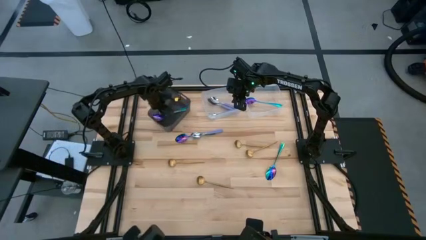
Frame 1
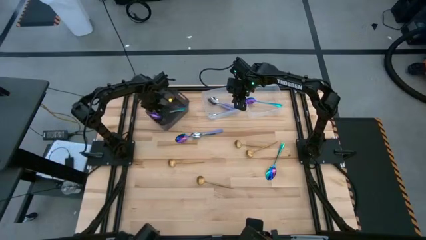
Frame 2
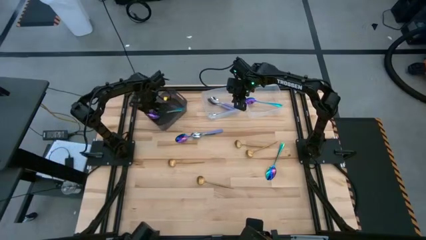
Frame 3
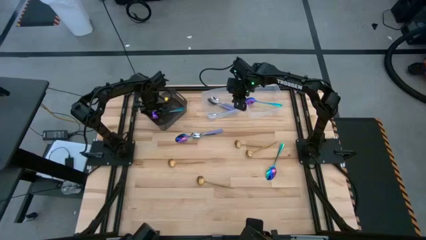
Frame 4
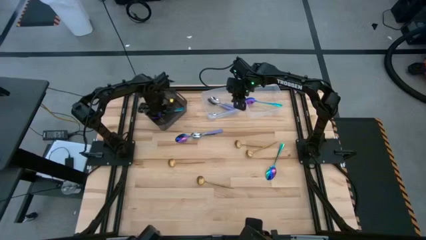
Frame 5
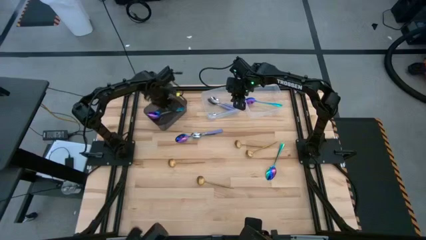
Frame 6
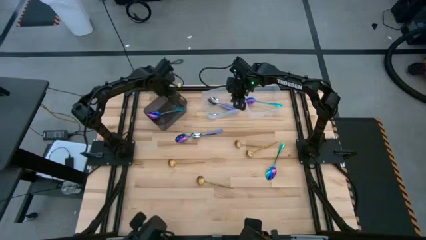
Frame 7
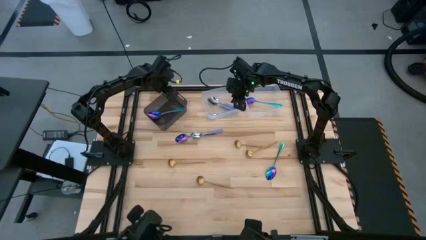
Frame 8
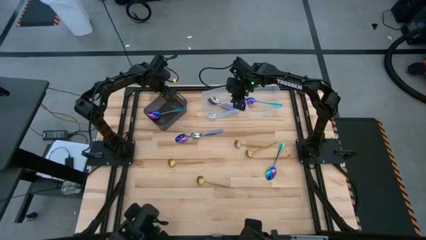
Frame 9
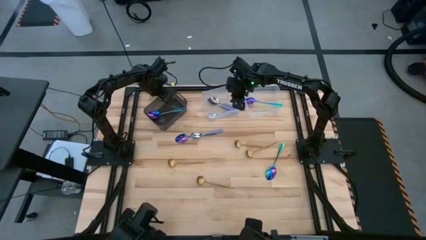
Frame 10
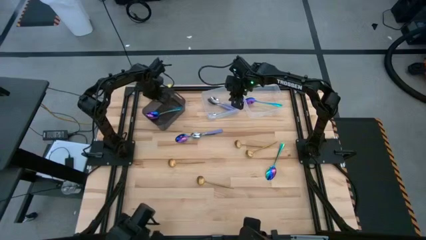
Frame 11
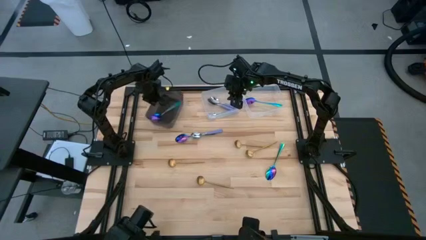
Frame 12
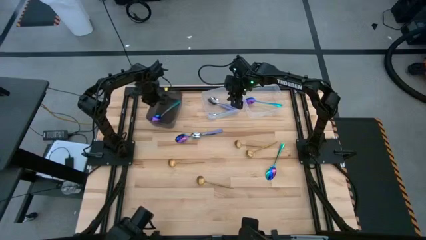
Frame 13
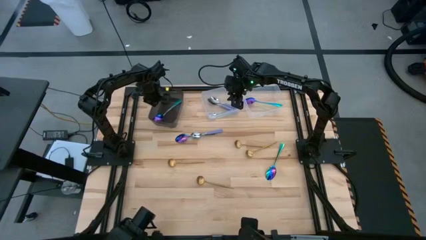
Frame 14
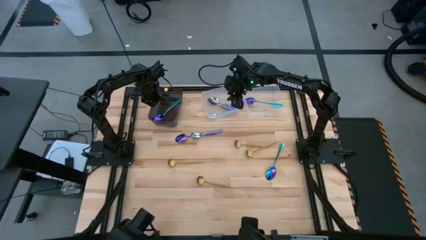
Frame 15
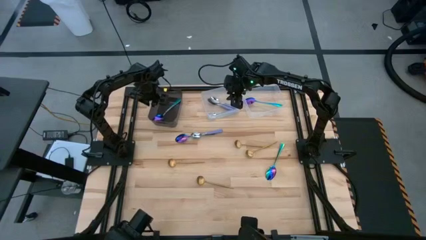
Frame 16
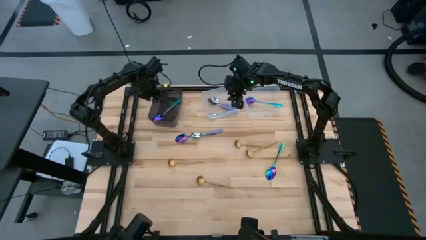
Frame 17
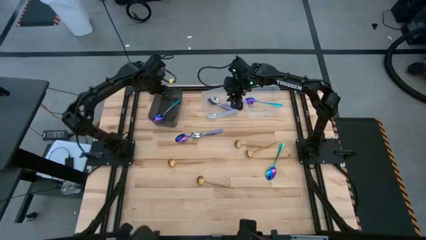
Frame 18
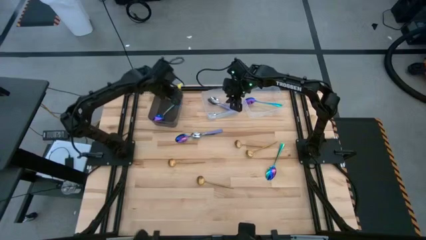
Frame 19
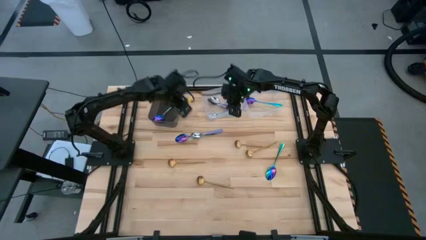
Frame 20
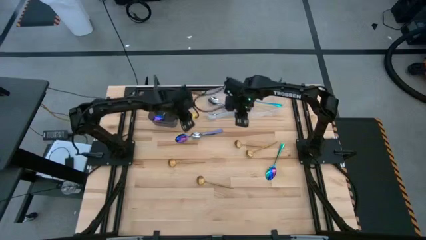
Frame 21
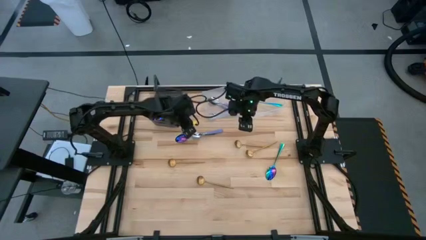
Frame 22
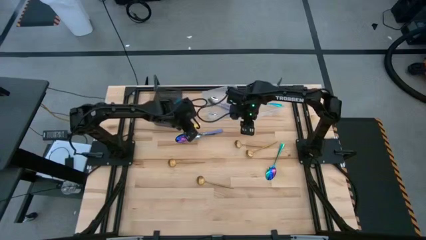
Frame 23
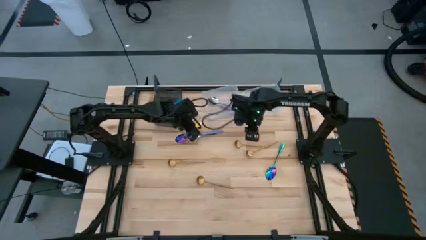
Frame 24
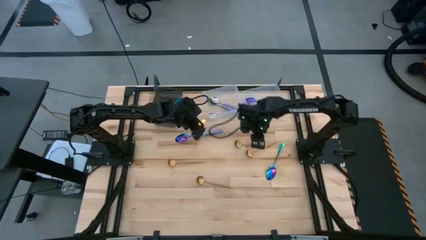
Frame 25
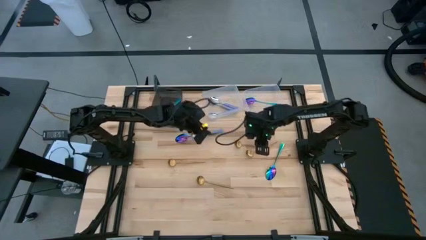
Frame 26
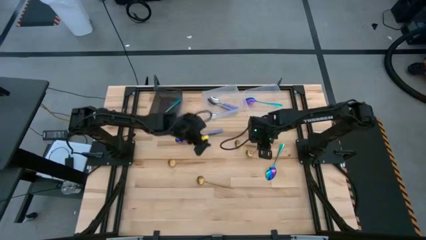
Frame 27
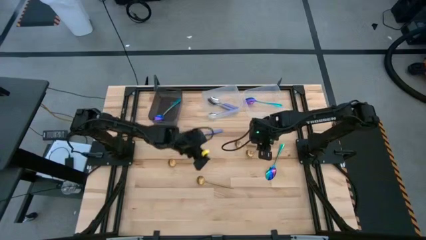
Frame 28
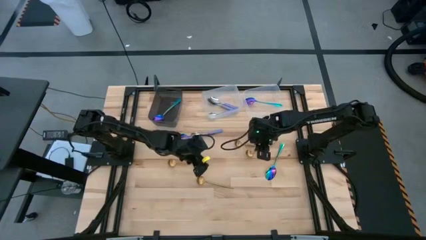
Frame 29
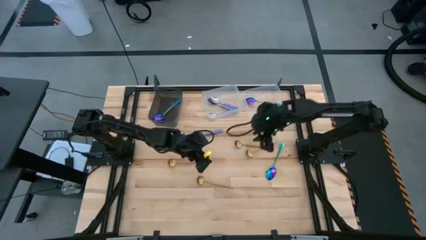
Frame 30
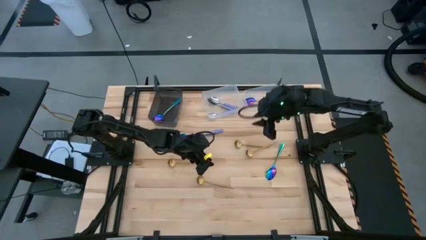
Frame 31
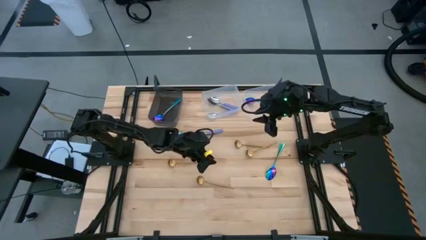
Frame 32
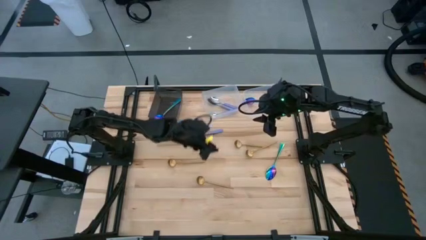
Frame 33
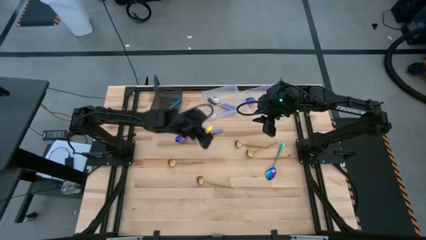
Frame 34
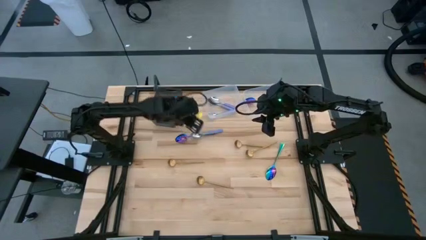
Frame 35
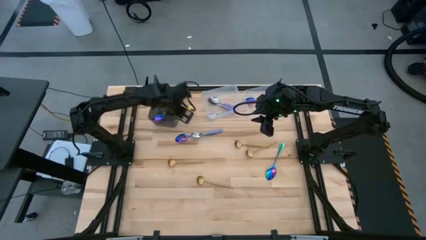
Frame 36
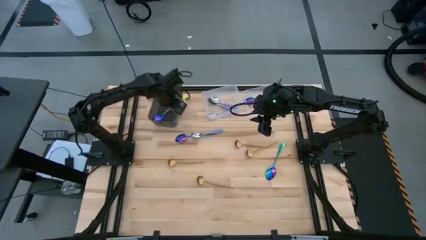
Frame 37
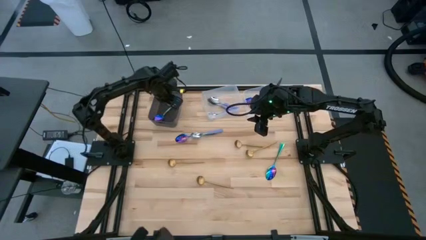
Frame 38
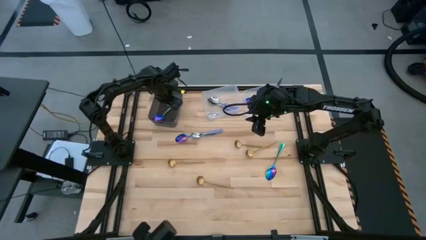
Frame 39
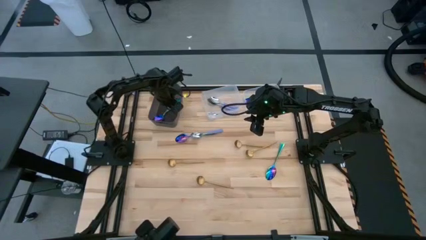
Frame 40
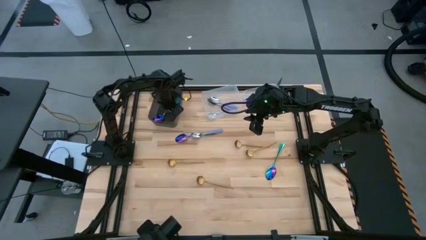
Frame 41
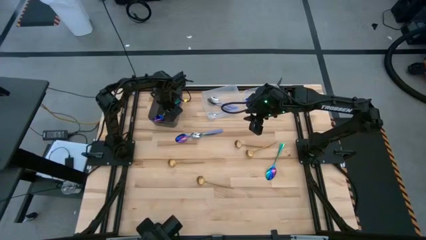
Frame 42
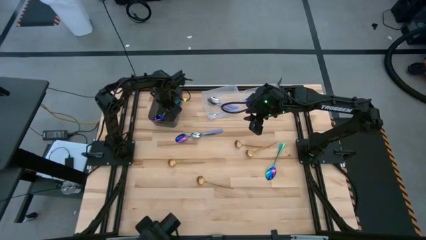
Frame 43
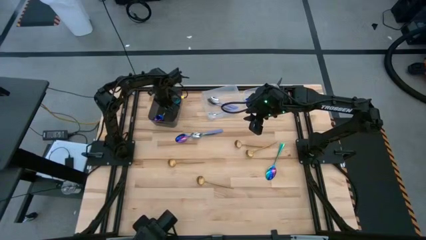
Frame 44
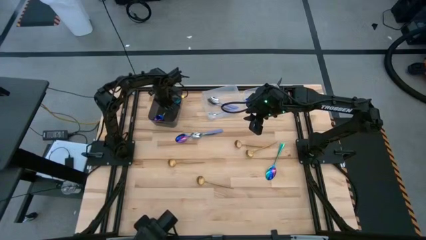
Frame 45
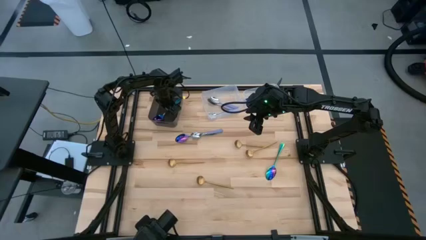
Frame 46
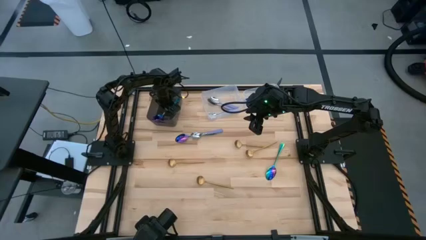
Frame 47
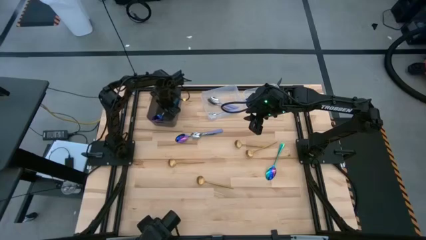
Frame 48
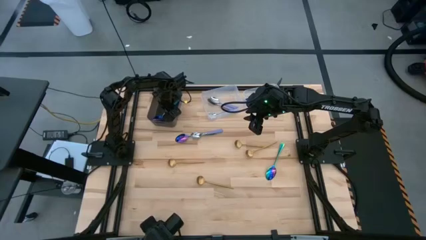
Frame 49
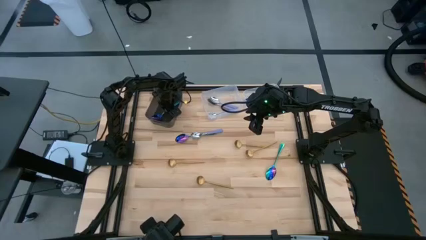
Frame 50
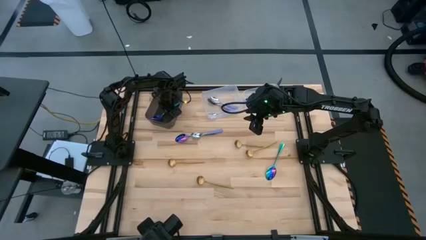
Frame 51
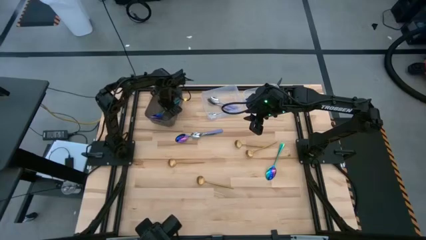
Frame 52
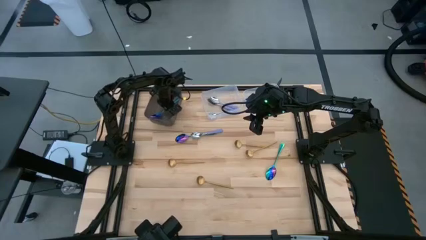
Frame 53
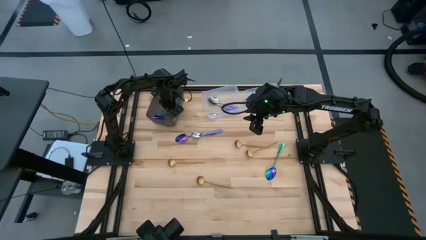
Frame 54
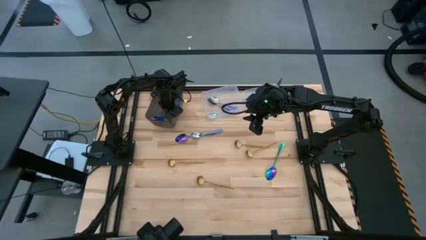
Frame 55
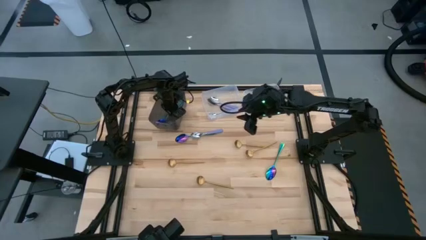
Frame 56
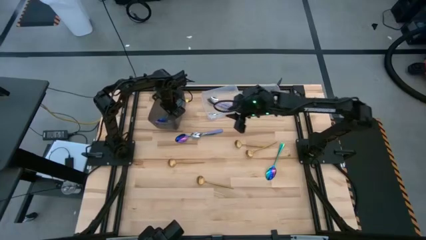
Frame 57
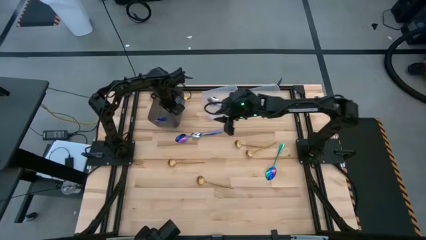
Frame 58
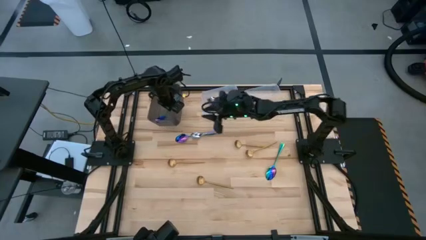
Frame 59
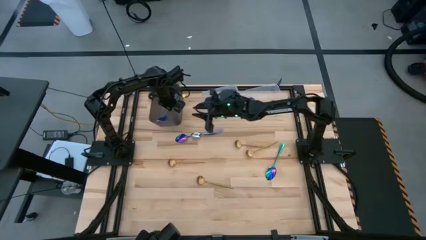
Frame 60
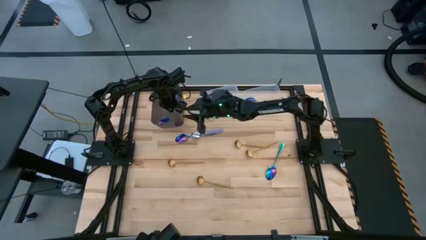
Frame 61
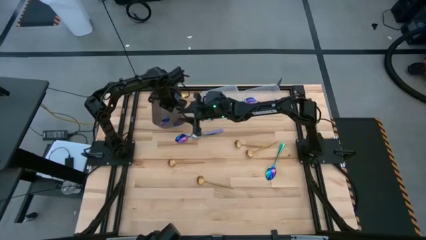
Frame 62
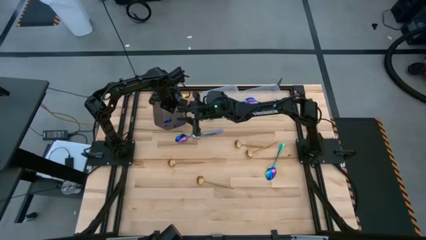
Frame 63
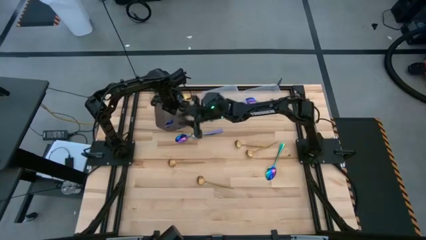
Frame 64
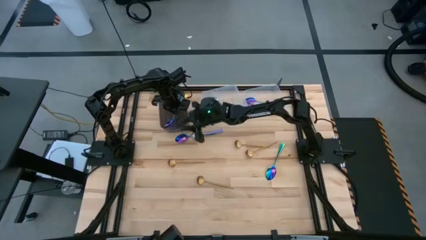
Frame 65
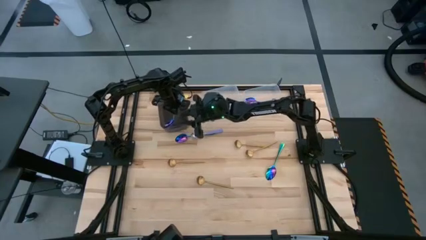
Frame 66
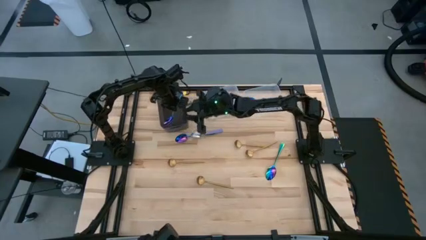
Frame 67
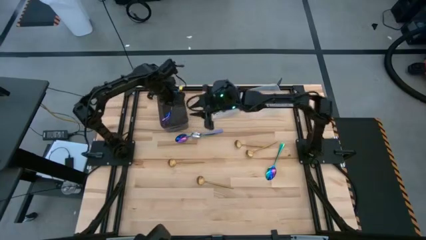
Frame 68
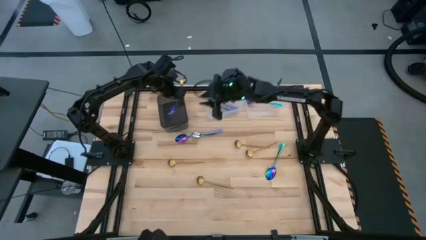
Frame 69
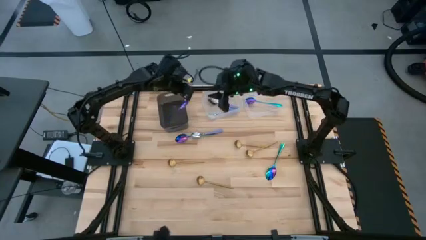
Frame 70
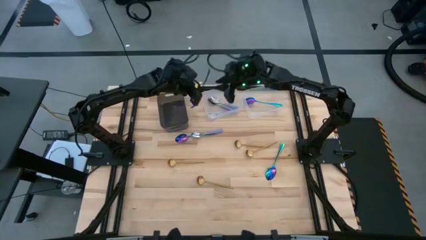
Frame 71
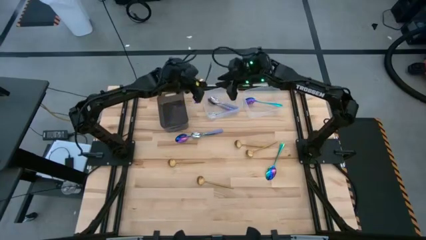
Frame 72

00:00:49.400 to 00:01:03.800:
Task: Sort silverware by color (type)
Put the blue spoon into the right transparent bin
